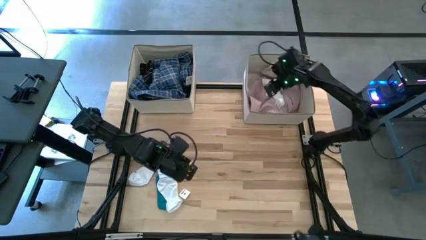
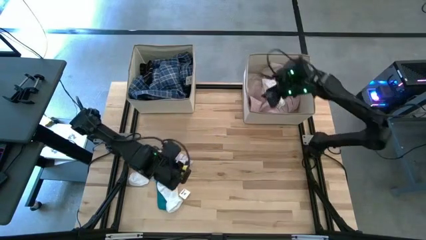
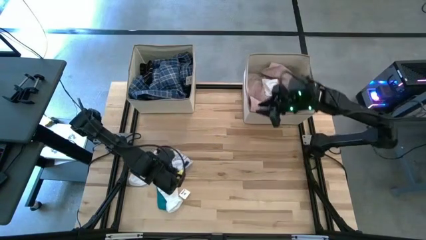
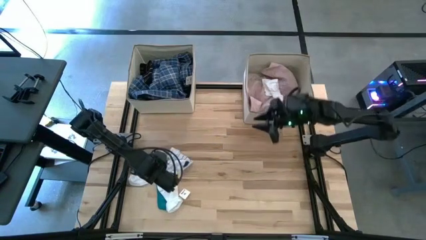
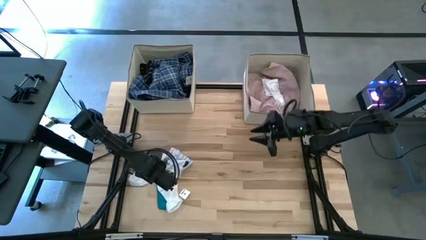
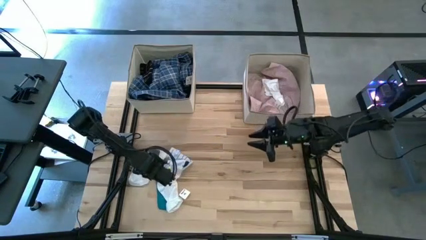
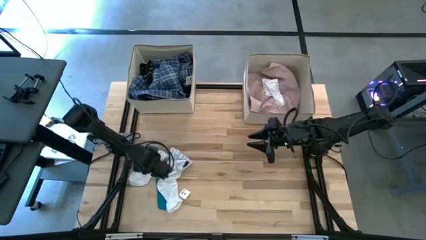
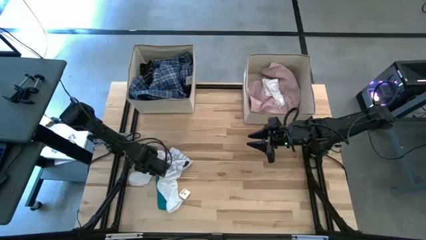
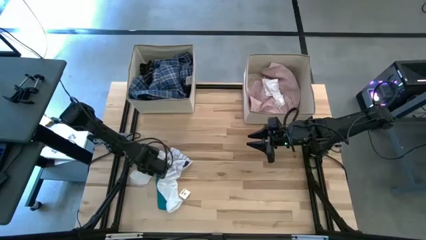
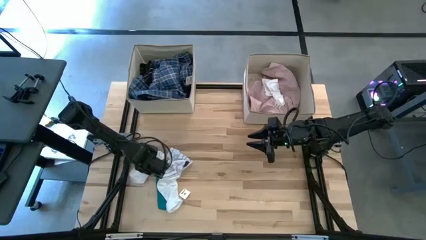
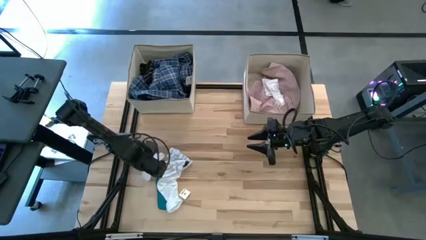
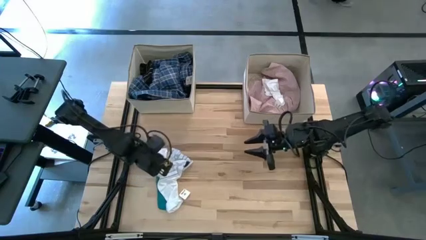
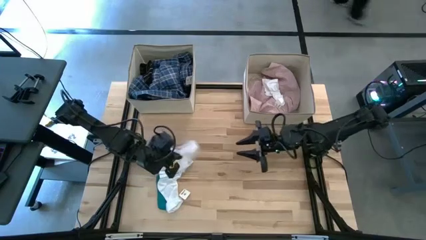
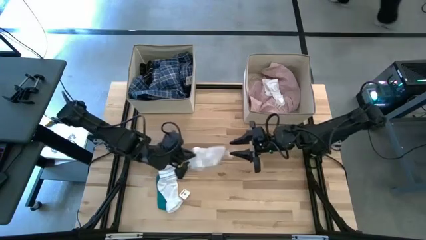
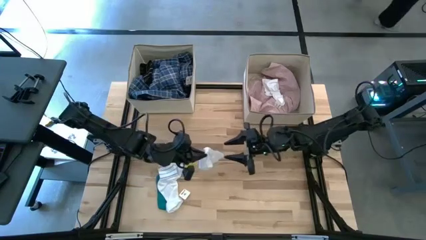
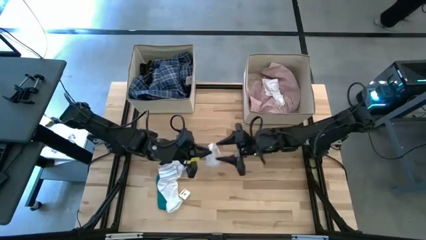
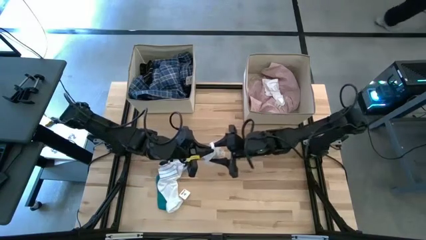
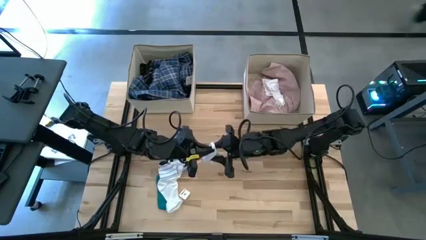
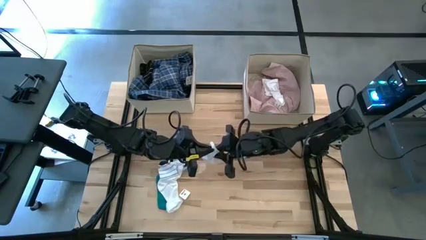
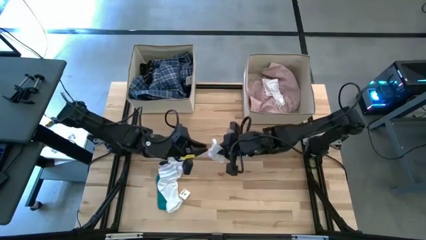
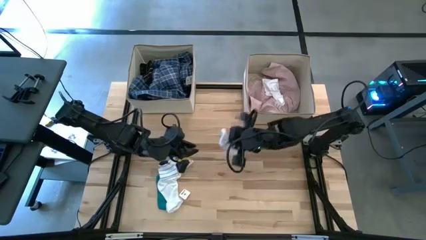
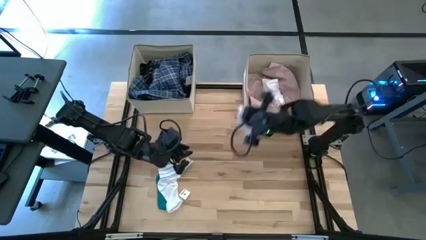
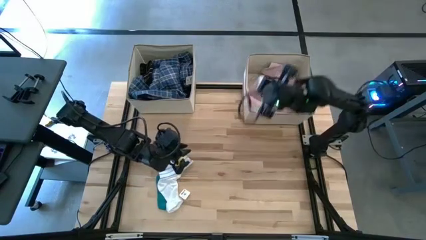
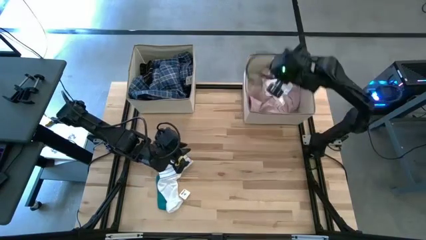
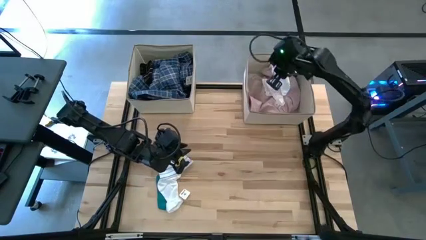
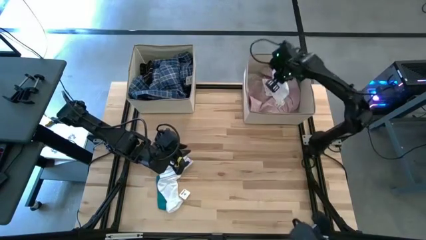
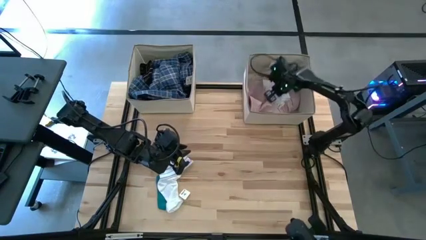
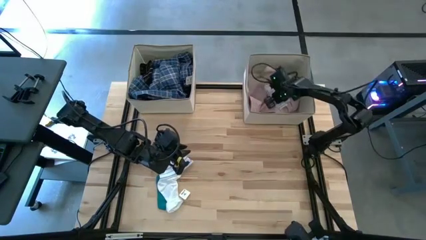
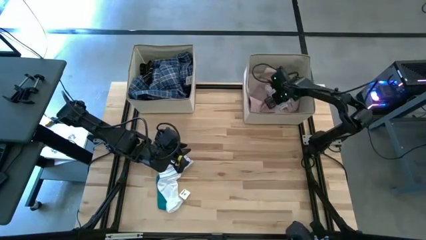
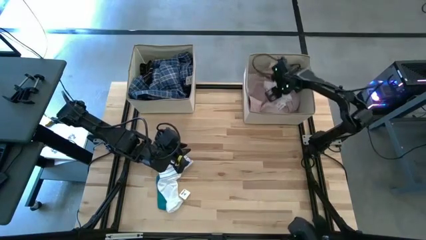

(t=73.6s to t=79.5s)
Task: Sort clothes
Put the white sock into the right laundry organizer

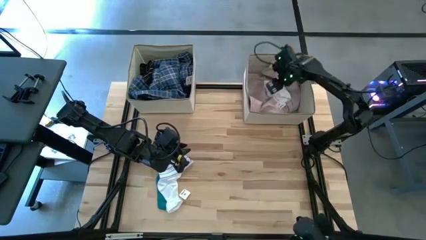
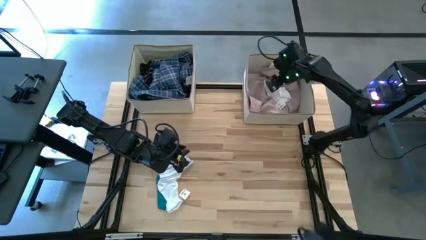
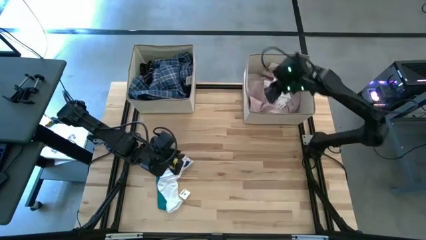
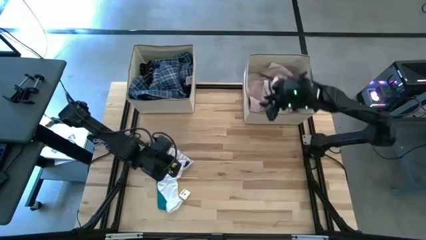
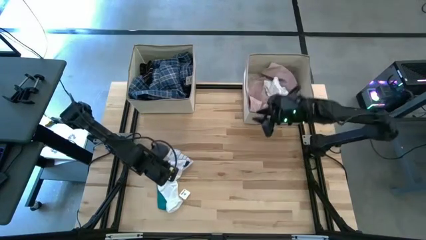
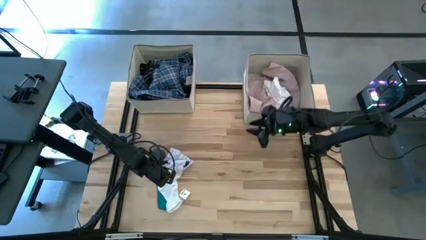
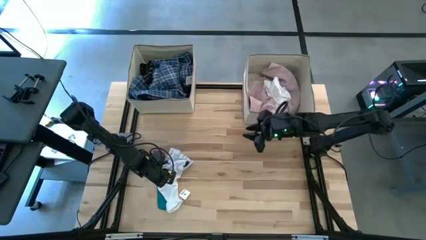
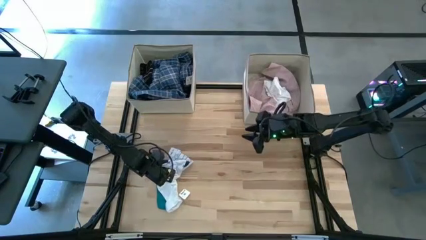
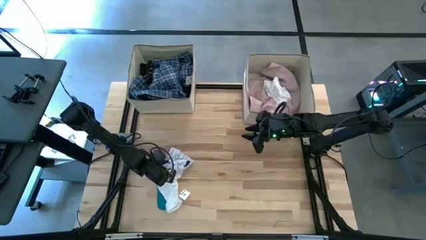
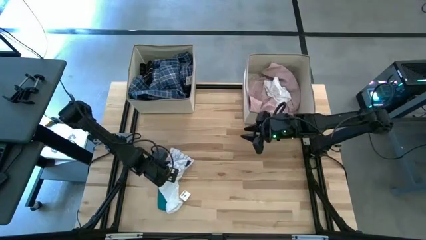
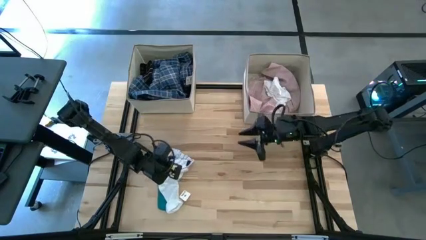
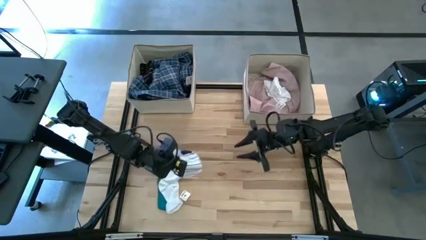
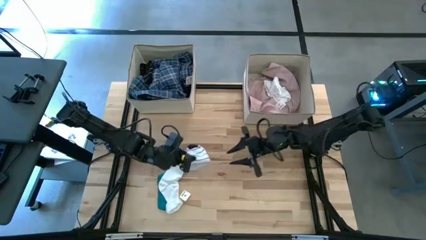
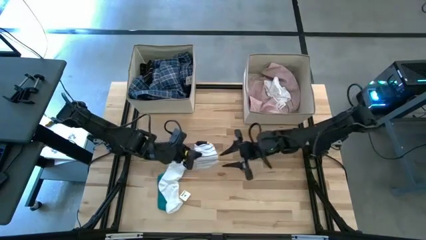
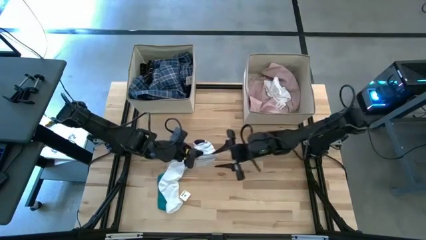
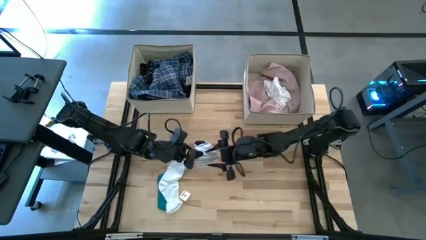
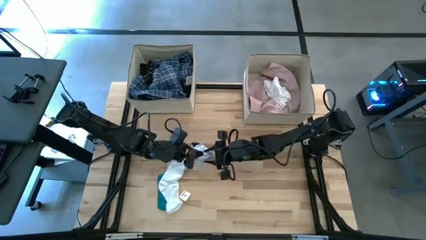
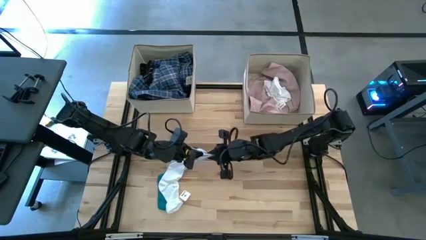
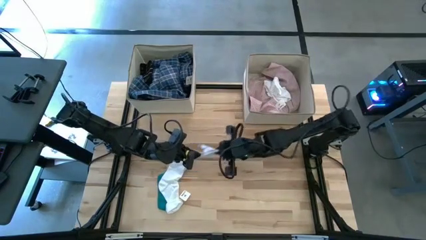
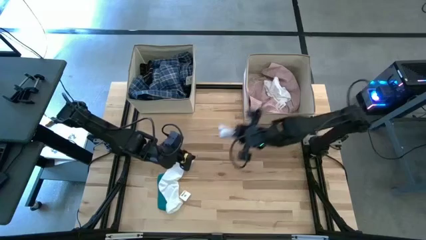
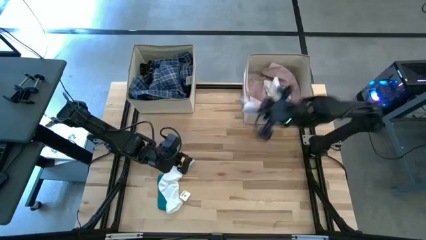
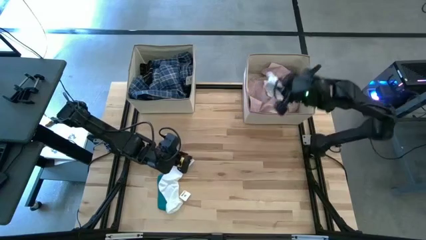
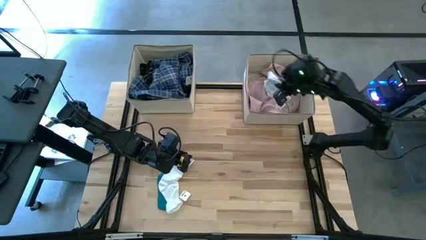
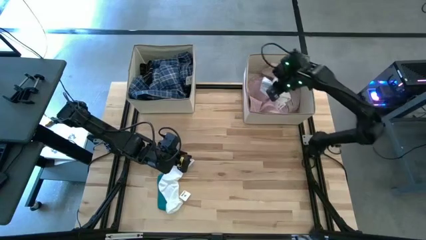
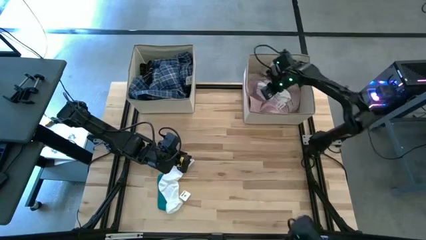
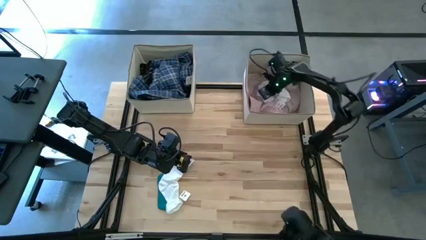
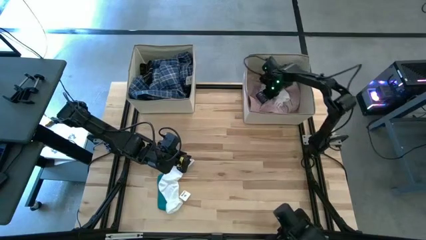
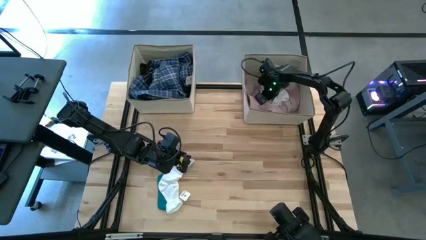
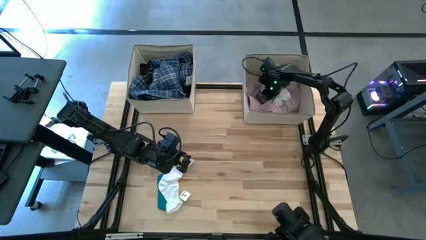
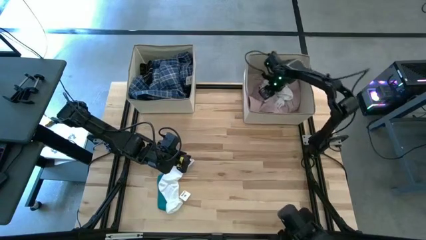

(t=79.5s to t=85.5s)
Put the white patterned sock into the right laundry organizer

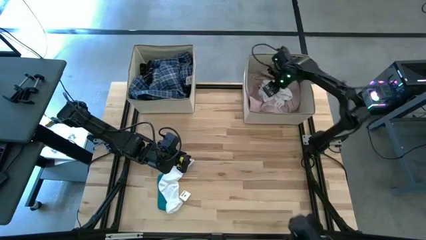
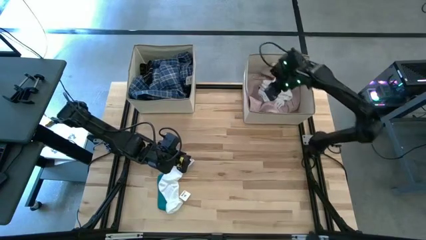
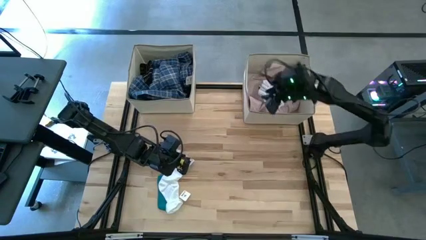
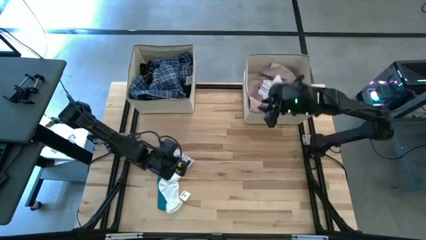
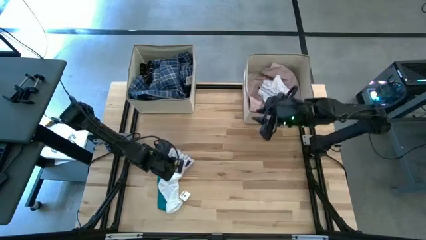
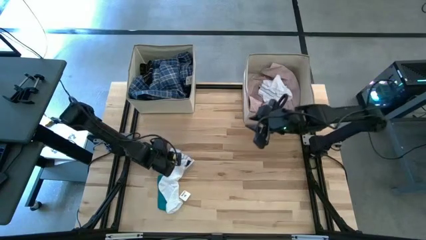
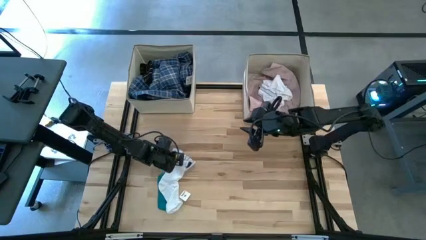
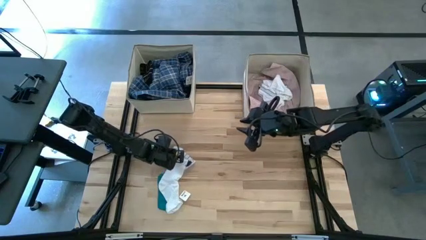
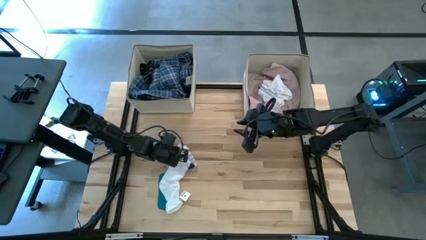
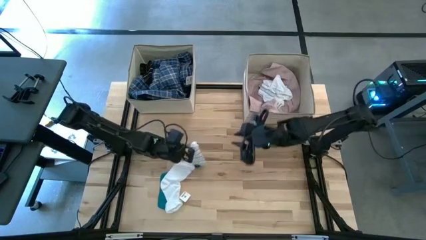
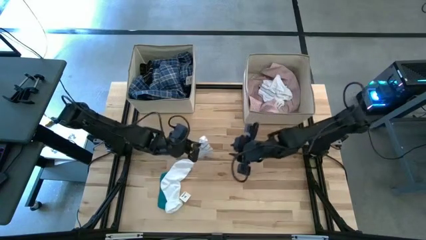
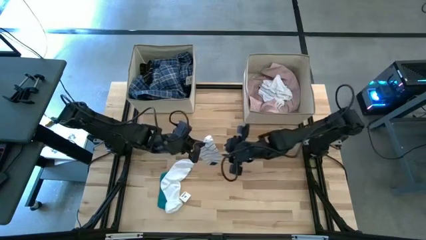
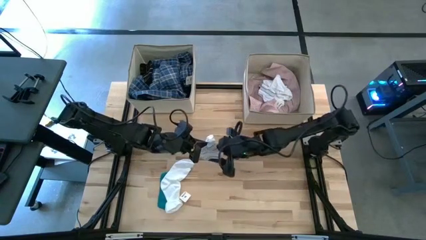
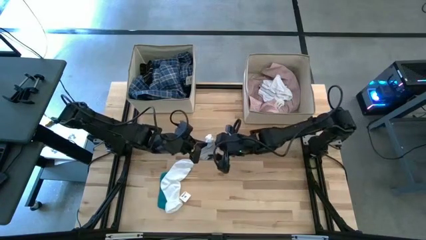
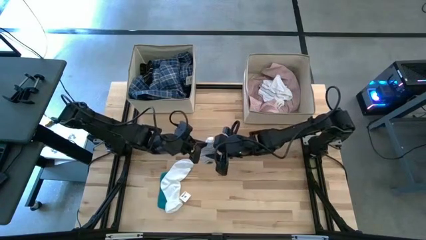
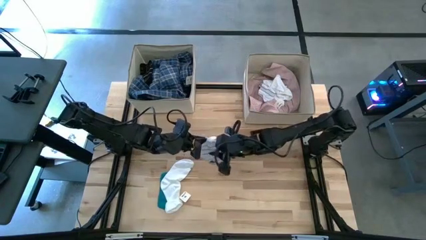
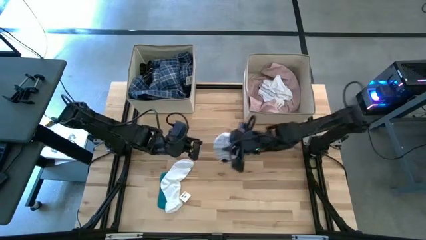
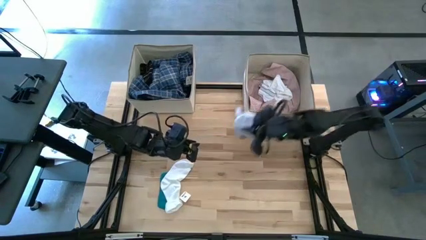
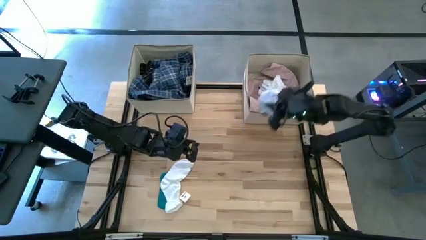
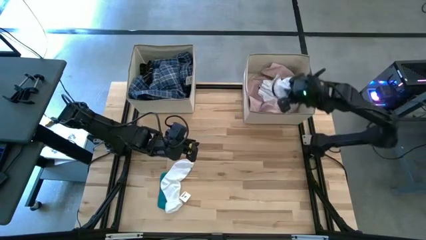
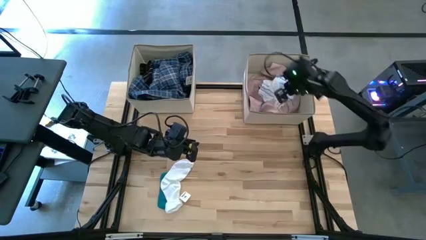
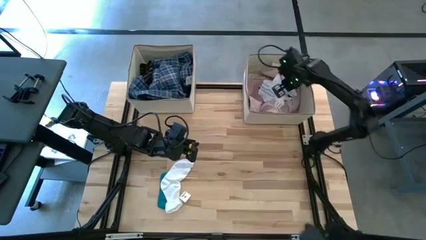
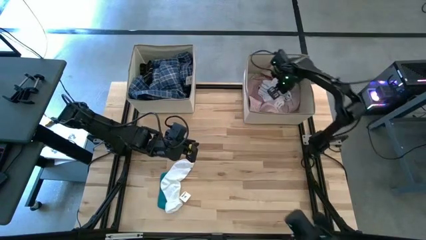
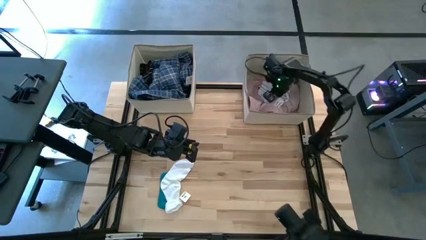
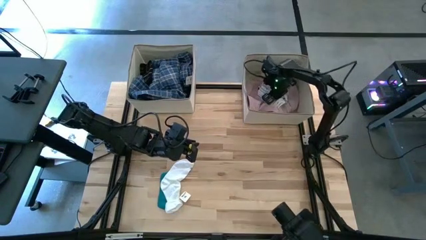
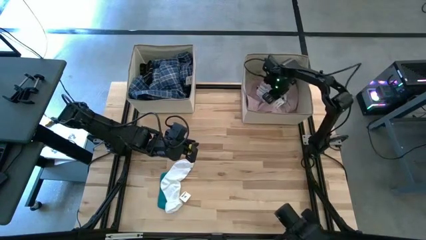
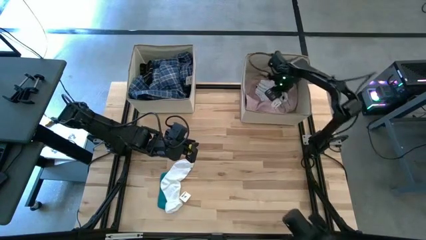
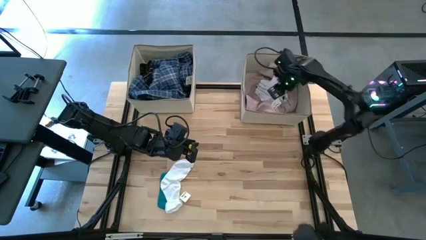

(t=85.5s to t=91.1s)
Put the white patterned sock into the right laundry organizer
